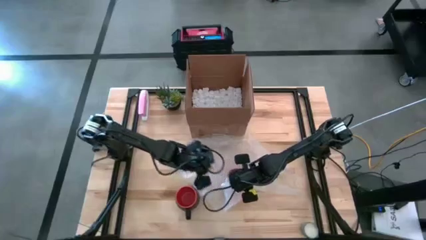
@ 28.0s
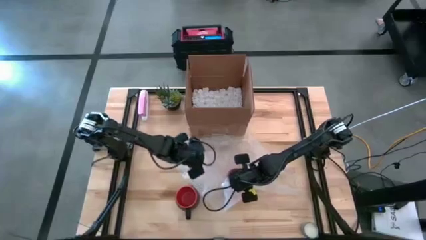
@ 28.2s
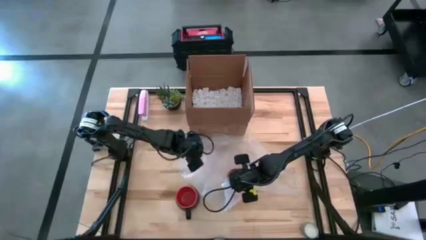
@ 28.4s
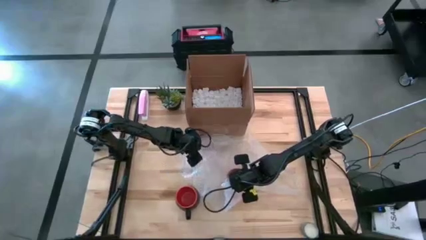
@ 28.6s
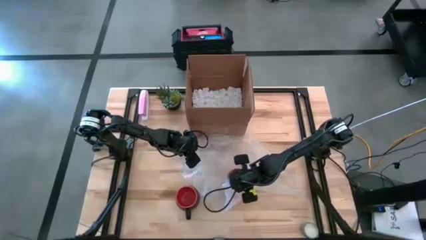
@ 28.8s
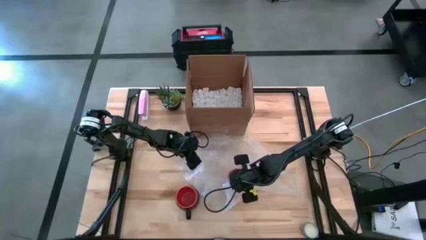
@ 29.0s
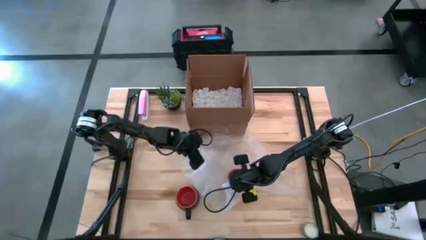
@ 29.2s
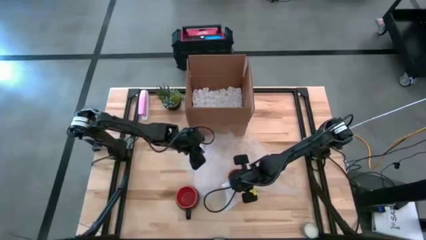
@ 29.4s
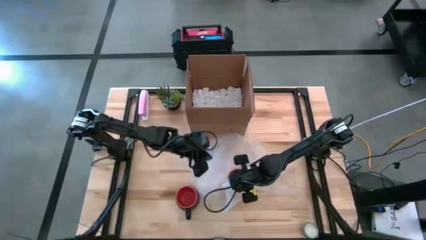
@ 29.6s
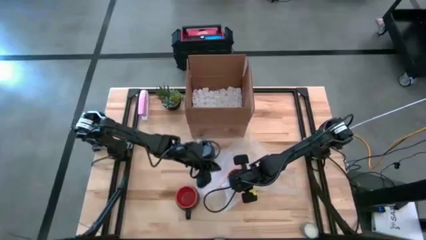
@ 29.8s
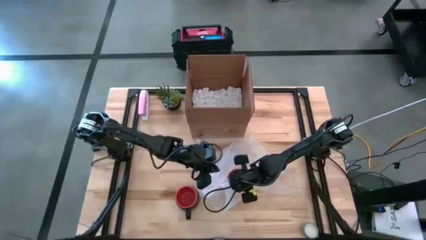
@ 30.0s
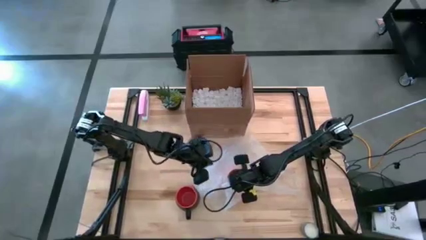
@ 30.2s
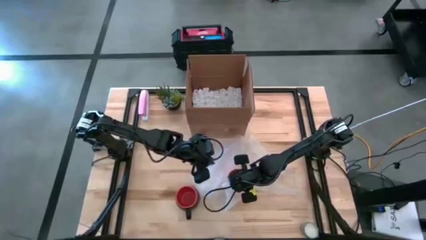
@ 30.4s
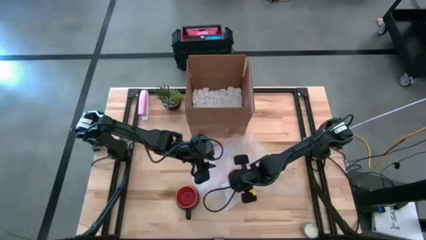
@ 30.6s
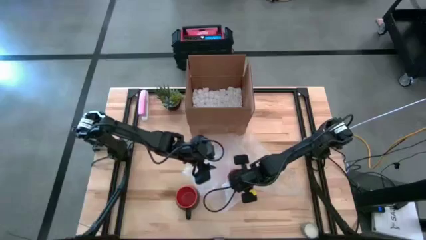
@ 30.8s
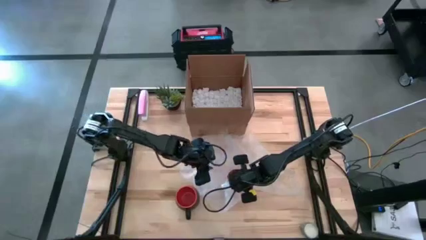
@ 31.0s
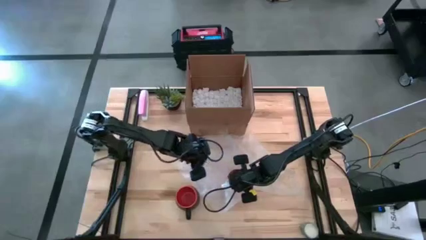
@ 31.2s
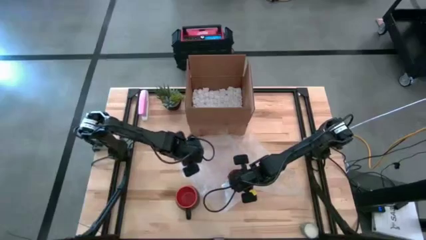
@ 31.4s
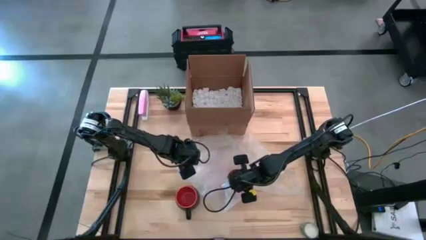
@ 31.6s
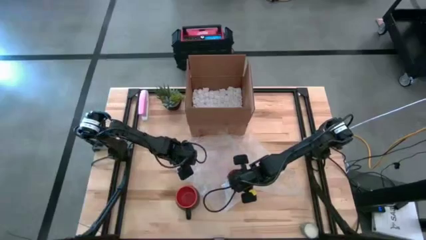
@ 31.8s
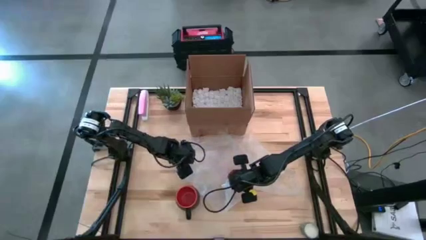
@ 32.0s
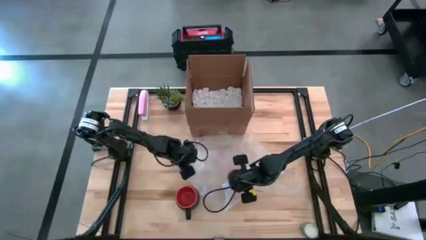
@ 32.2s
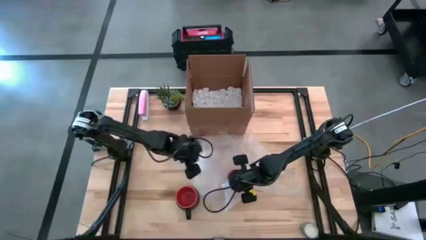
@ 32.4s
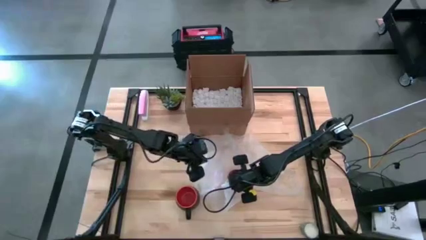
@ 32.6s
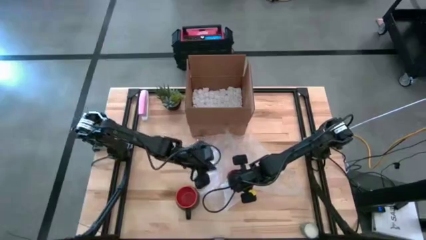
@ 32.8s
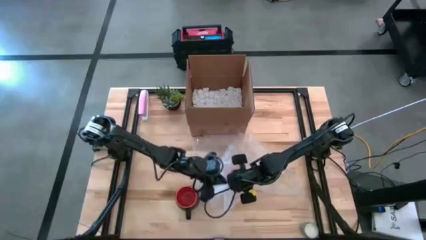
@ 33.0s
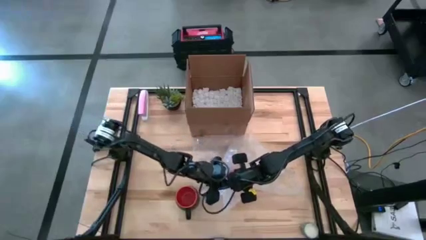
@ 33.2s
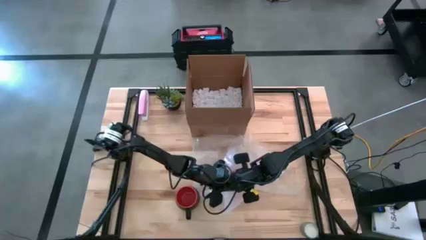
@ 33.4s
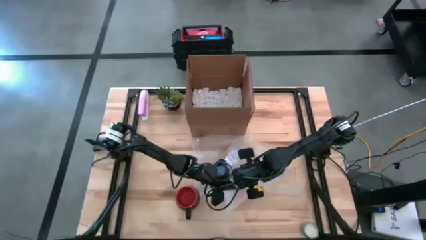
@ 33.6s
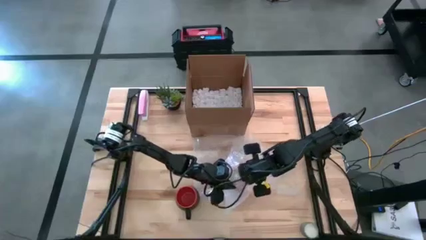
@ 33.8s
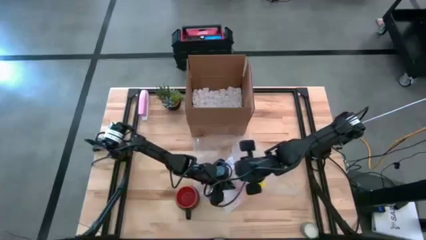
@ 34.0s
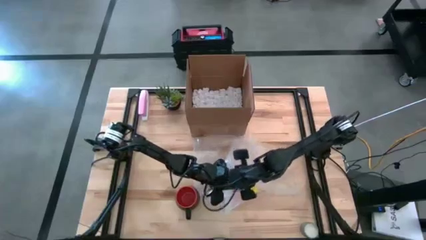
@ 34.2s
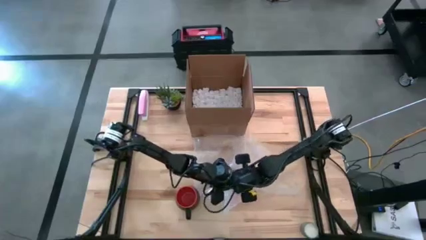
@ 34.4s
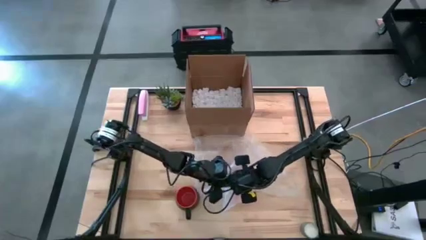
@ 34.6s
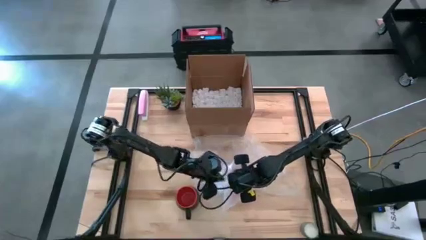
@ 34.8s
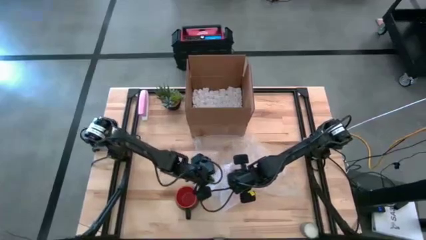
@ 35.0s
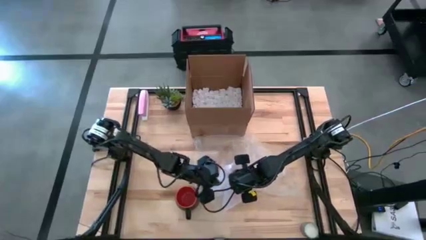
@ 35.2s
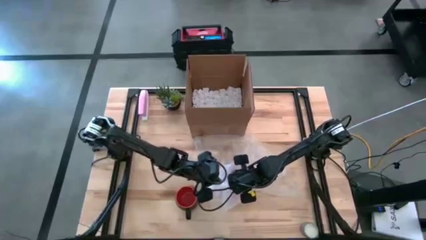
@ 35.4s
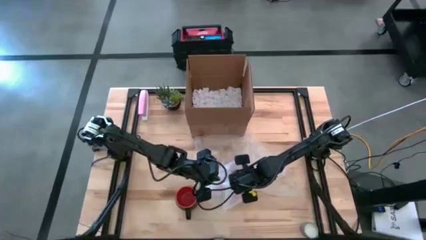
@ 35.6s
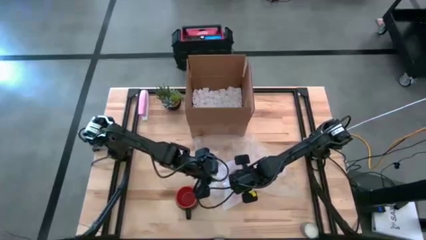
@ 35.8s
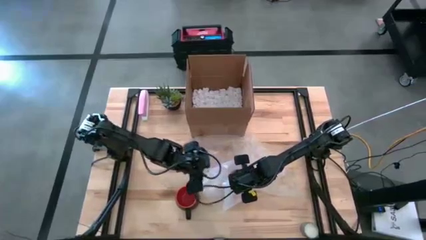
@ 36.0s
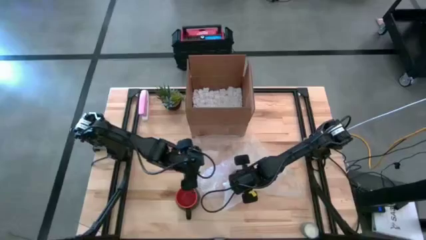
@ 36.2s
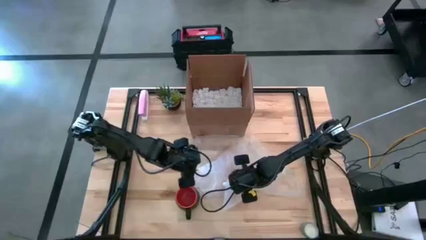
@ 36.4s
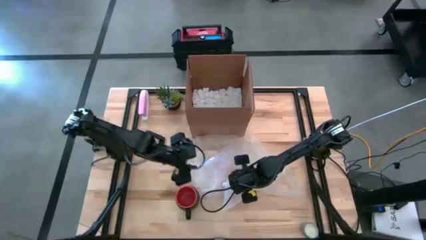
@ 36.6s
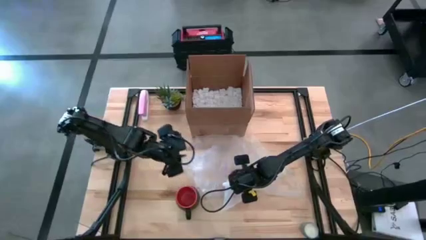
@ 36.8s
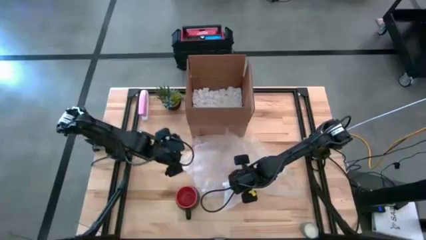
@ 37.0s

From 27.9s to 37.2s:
Task: wrap mug
Wrap the orange mug with the bubble wrap on top
